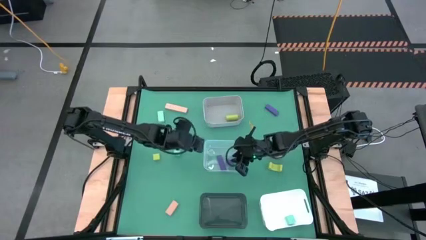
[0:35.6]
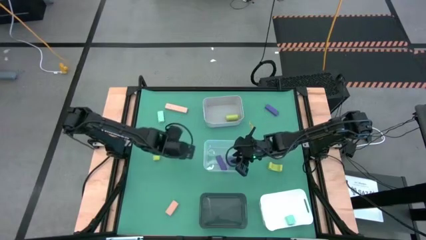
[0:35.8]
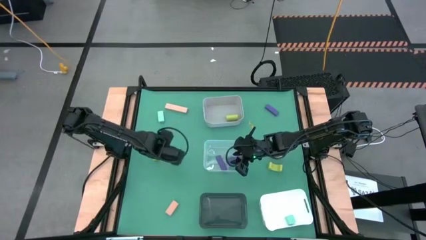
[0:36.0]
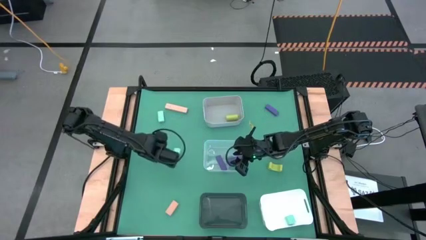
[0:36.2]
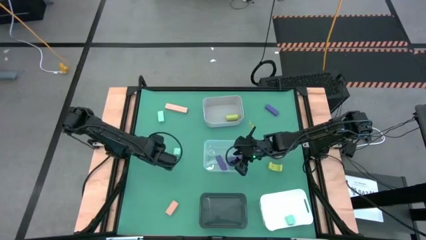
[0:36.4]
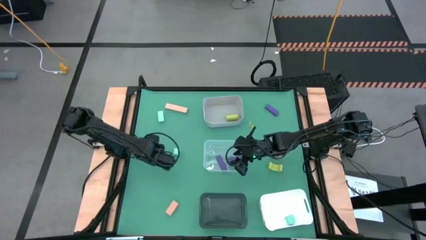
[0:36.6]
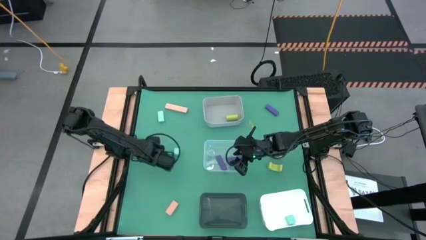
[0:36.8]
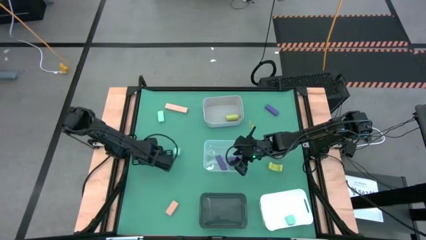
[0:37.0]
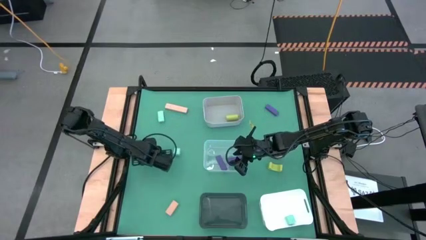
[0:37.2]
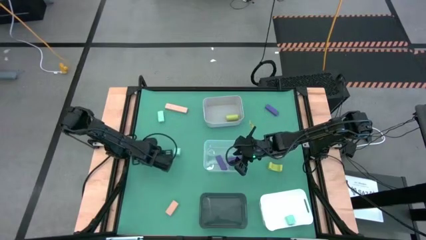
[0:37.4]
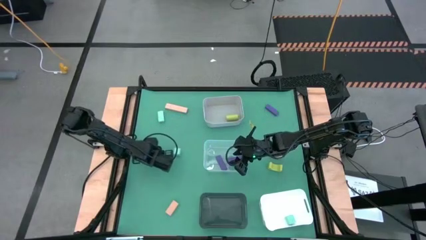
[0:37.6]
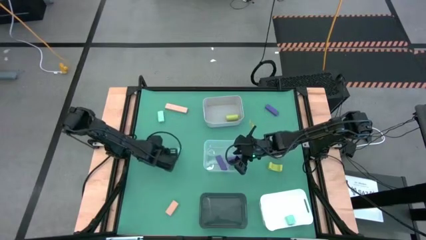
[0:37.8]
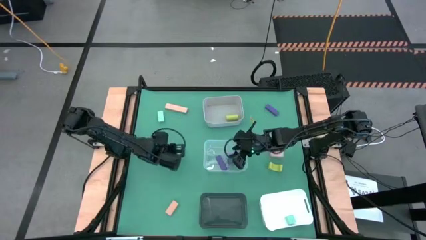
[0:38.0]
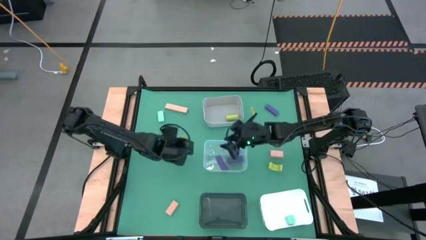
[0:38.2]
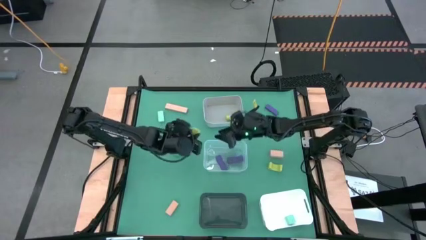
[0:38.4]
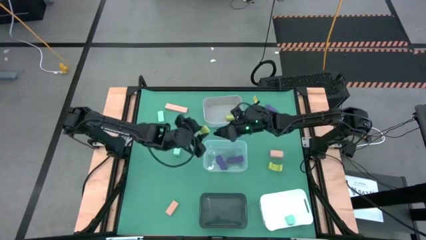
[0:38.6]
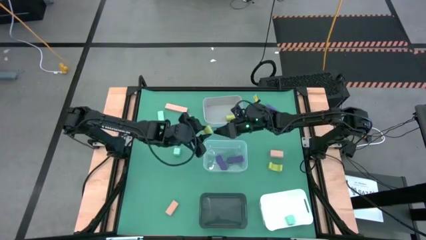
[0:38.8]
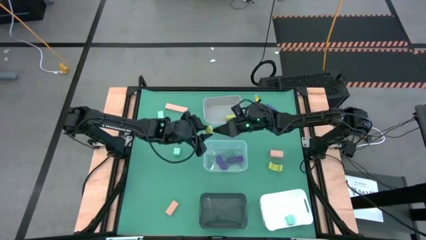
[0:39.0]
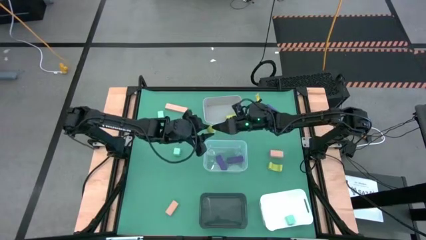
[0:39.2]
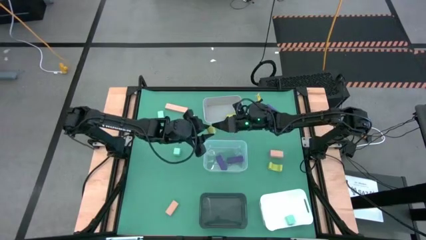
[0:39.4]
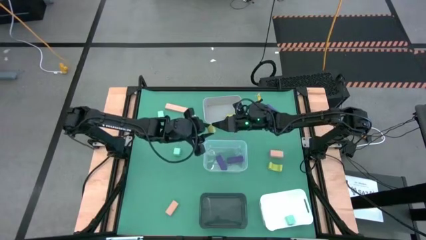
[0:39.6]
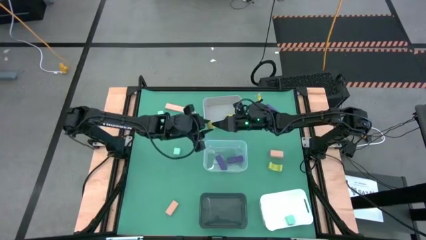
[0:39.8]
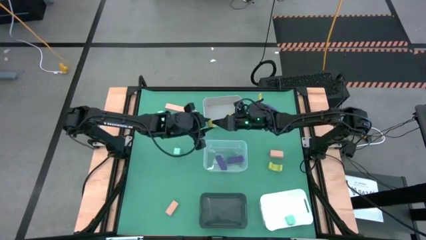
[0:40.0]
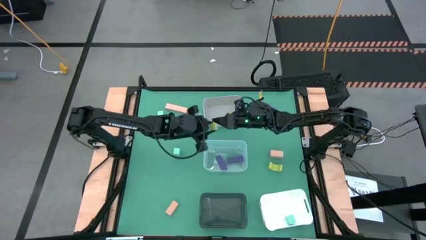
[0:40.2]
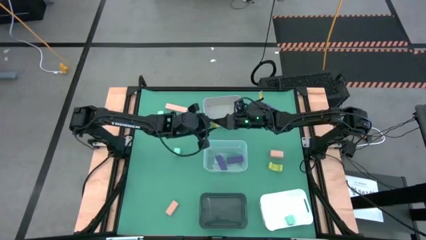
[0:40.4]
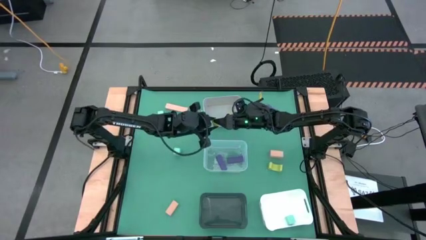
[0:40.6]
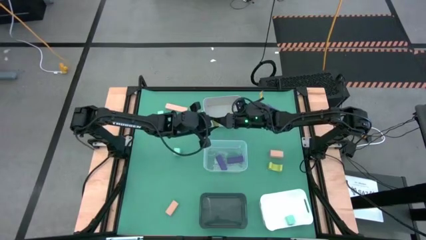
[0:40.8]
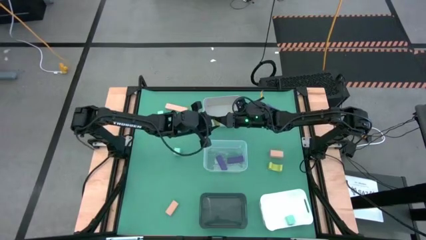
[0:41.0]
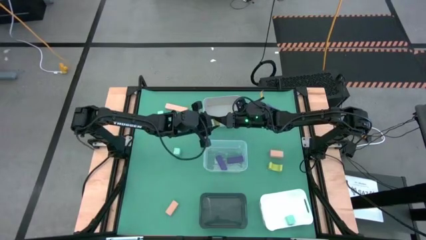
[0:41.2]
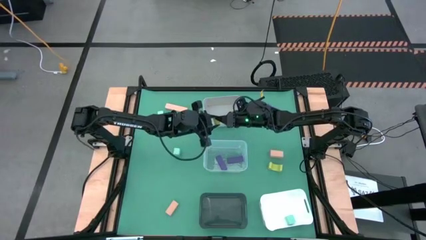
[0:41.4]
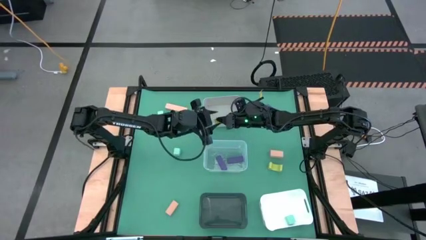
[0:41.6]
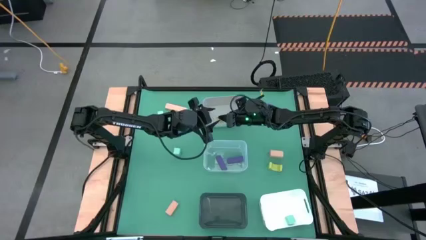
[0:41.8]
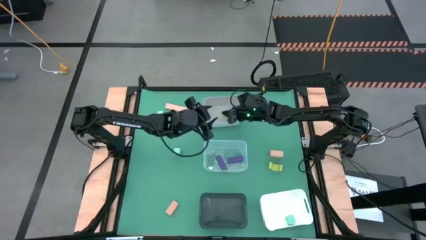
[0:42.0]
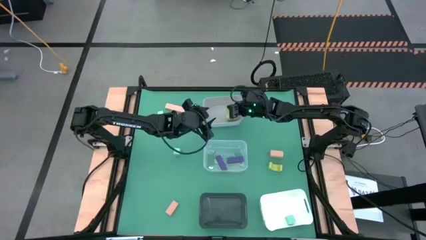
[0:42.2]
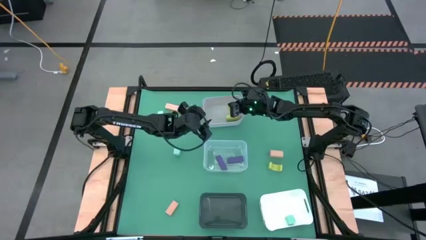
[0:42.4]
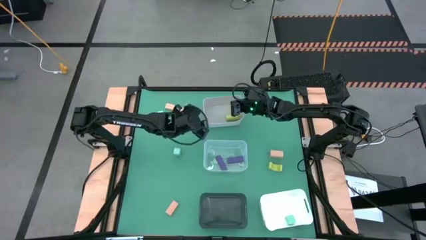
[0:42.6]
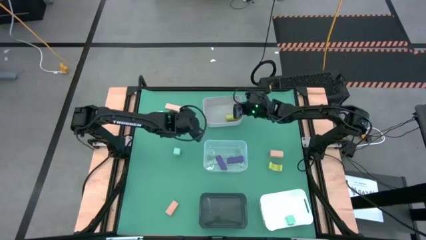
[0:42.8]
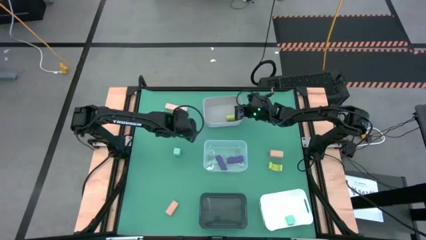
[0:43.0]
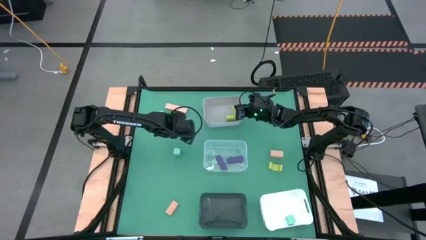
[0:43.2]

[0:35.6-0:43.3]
Task: Sort & place blocks by color
Put the left green block into the gray bin

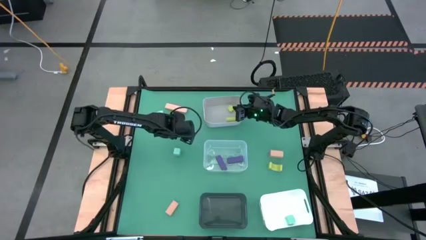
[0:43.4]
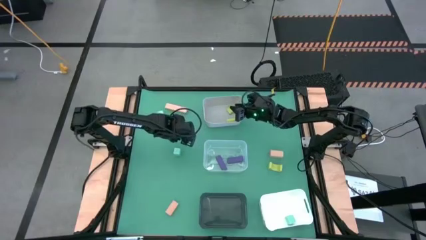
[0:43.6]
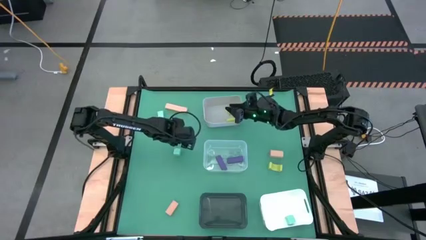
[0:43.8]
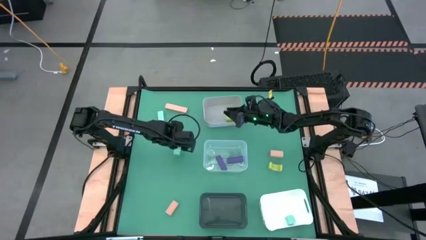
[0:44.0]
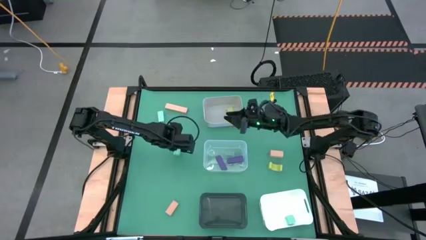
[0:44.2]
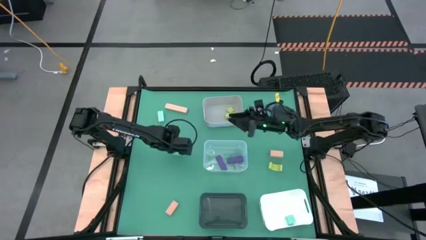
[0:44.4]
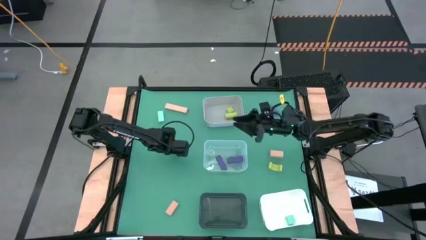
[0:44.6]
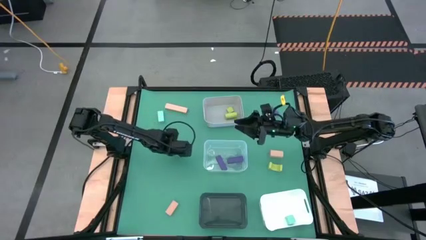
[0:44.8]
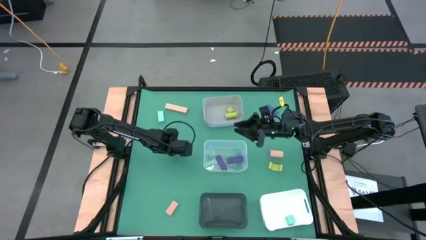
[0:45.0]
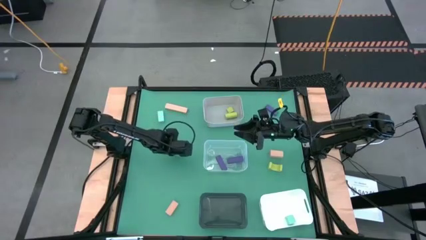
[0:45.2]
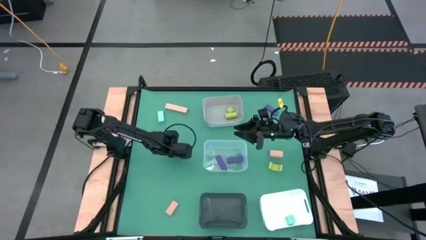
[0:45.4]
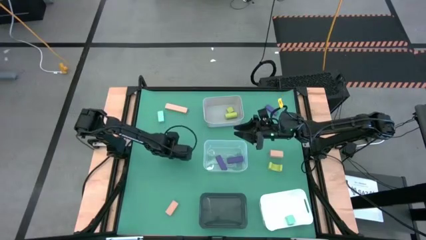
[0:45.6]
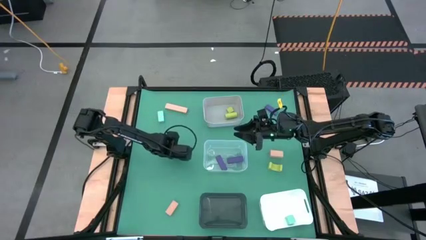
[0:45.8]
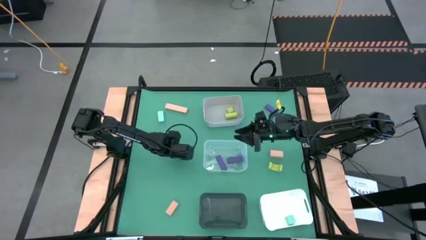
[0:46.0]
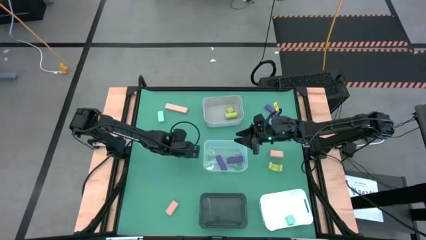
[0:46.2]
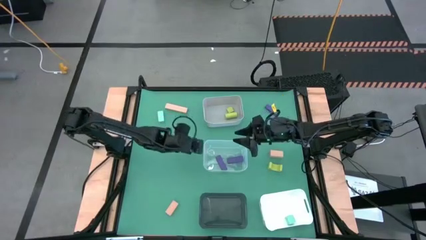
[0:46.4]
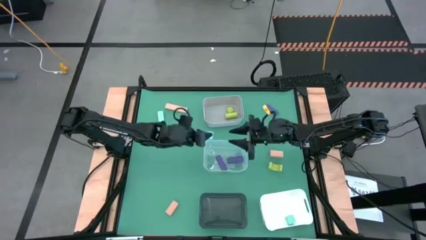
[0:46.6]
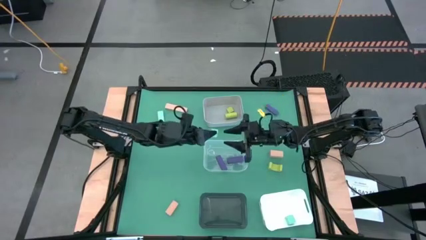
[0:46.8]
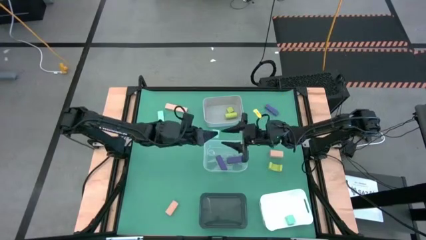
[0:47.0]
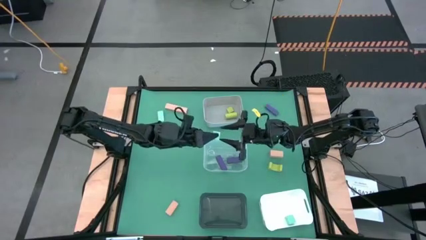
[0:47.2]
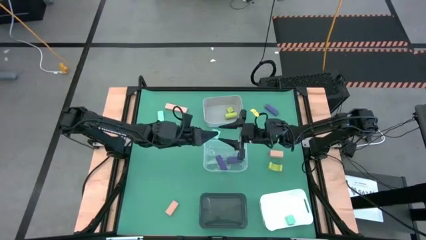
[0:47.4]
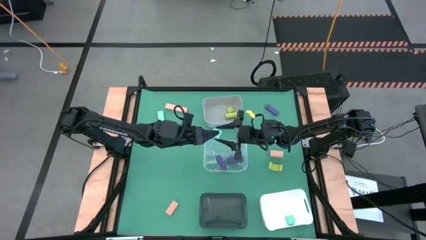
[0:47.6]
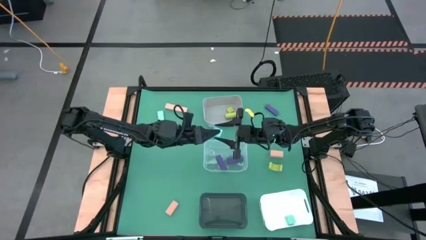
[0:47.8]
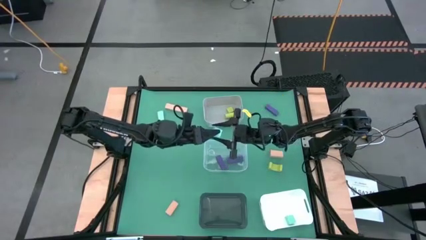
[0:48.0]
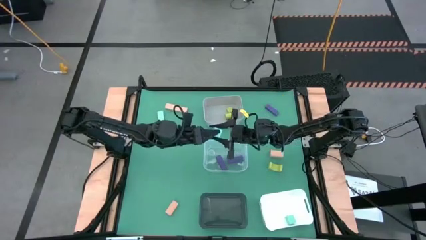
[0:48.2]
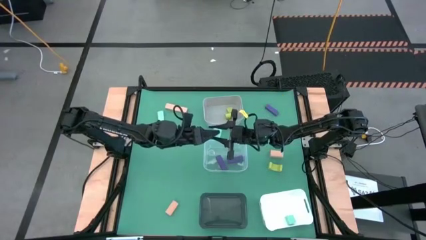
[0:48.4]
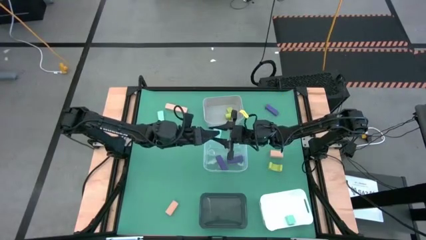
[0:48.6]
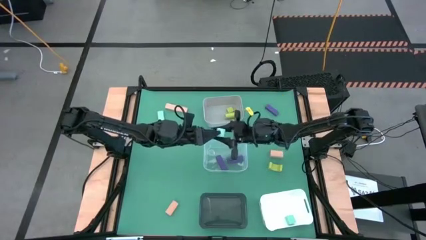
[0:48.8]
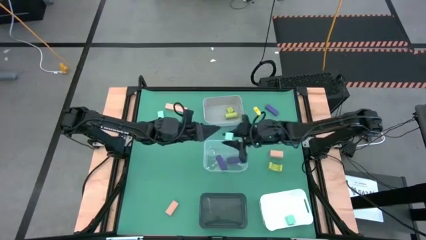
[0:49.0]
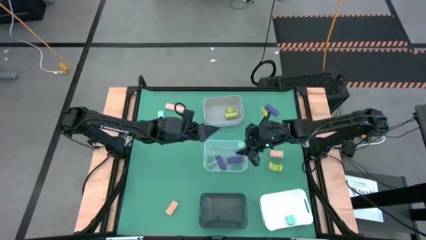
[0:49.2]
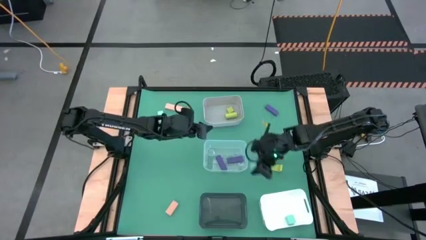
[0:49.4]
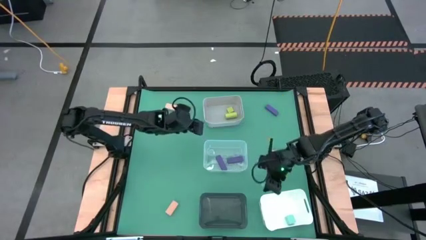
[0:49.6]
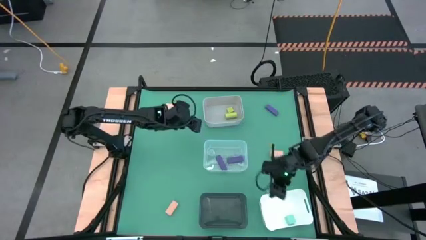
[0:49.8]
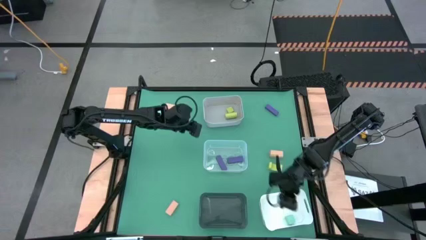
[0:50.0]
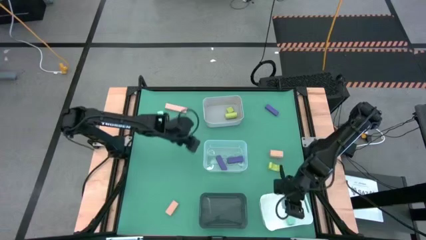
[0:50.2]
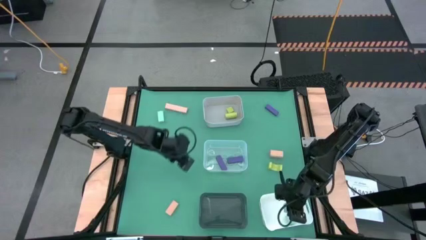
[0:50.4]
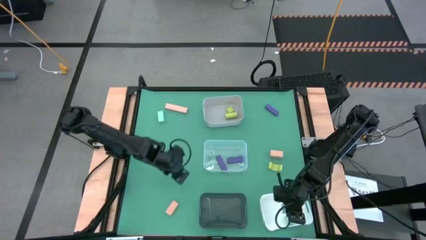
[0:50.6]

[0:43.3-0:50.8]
Put the bottom blue block into the white bin

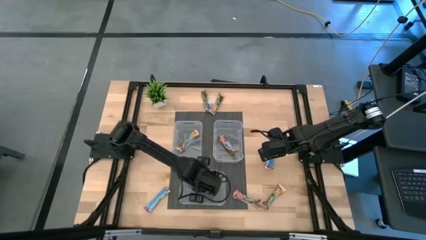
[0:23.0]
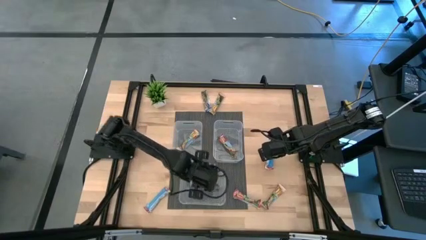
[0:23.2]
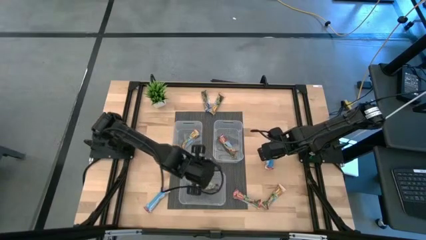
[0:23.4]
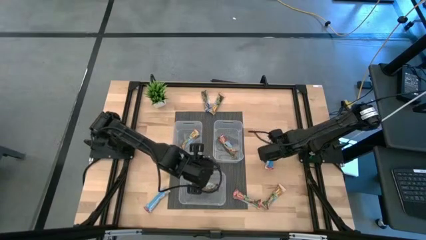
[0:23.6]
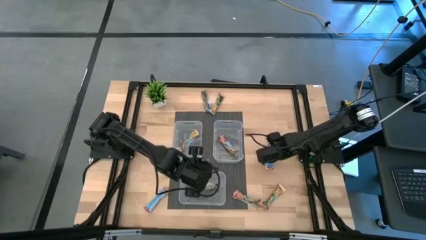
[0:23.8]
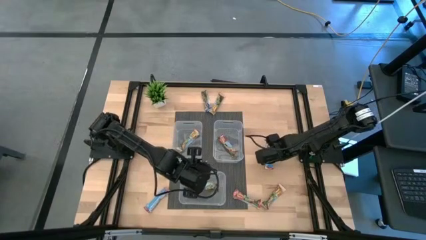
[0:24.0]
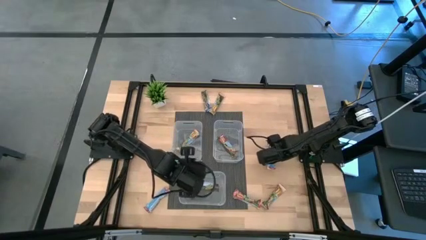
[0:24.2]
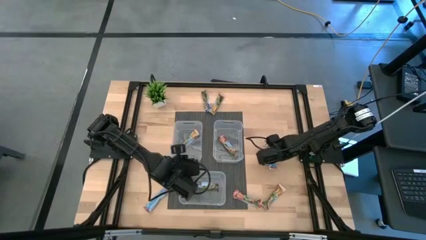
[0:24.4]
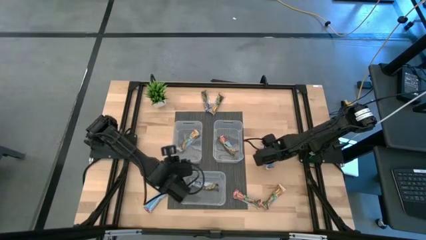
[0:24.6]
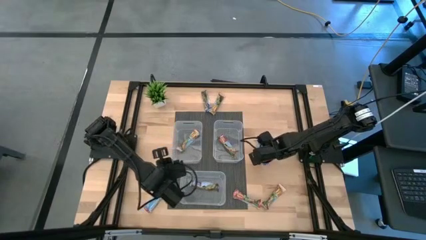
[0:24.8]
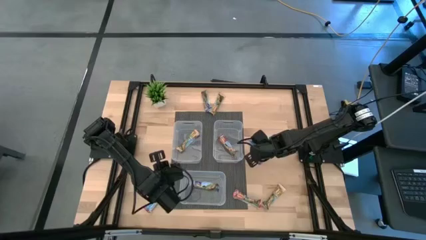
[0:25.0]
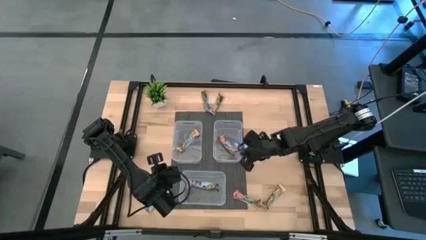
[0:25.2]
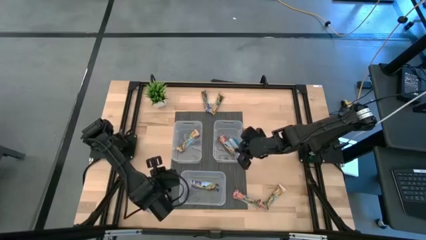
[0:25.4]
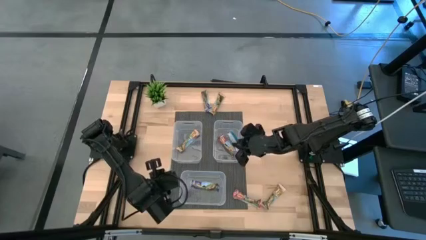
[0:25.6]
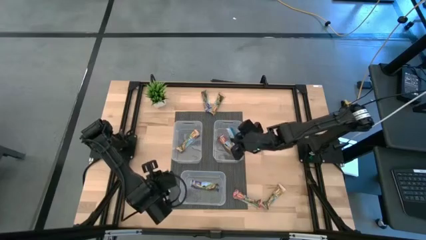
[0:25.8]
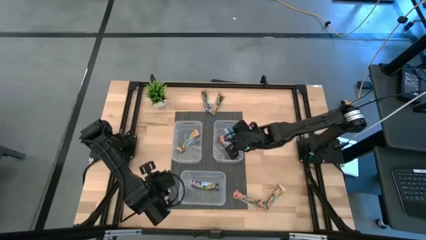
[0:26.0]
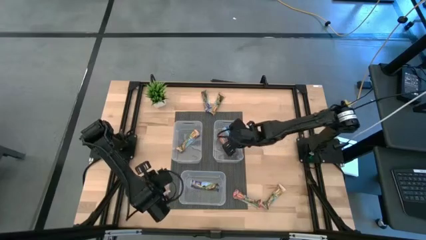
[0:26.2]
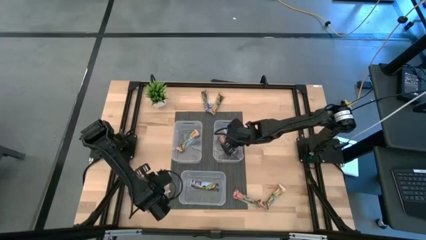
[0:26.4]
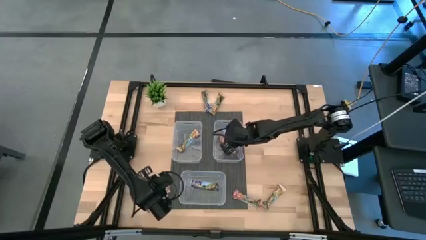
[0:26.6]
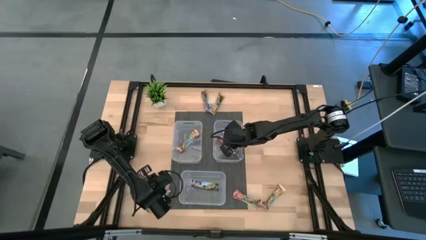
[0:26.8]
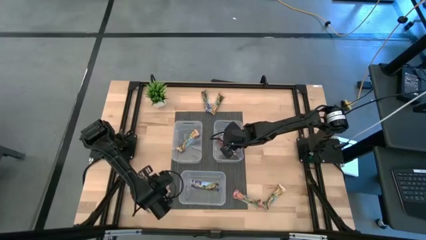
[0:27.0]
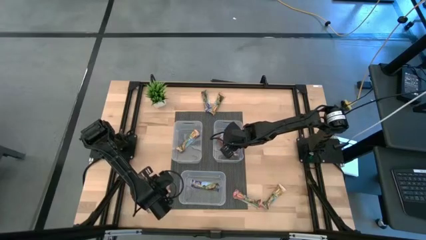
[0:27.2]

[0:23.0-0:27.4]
Task: Pick and place Granola Bars by type
Put the top red granola bar into the top right transparent bin
